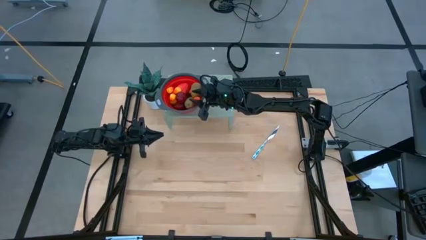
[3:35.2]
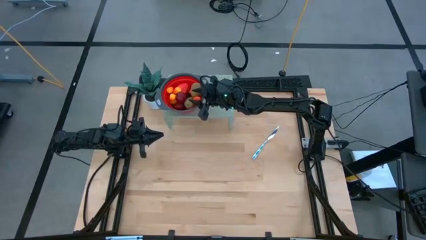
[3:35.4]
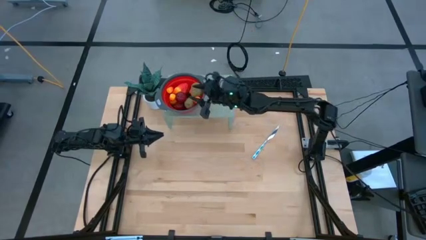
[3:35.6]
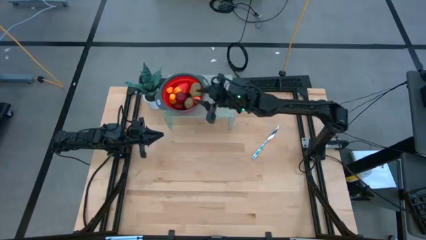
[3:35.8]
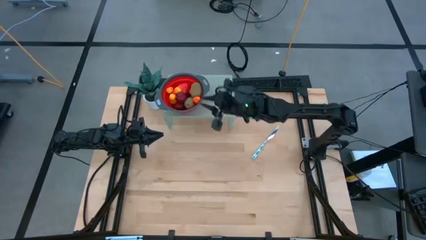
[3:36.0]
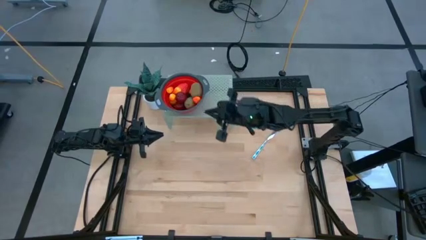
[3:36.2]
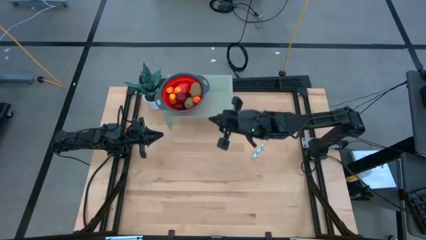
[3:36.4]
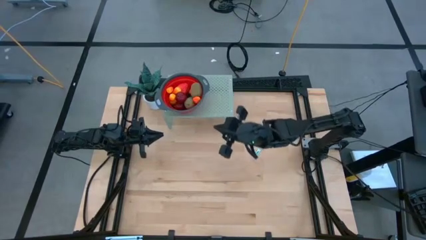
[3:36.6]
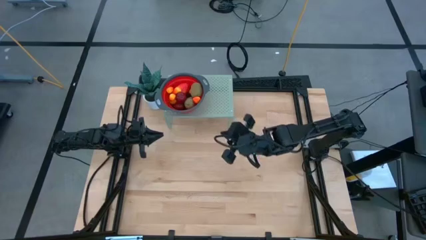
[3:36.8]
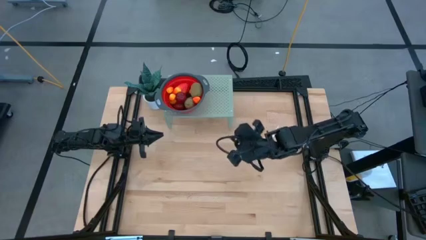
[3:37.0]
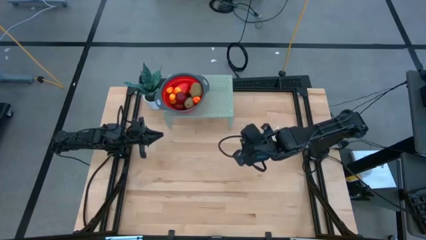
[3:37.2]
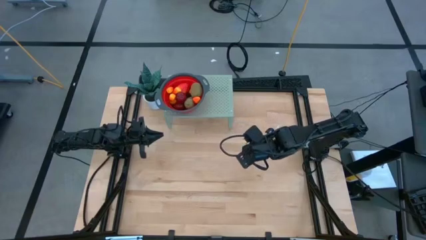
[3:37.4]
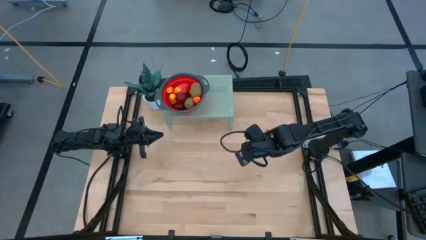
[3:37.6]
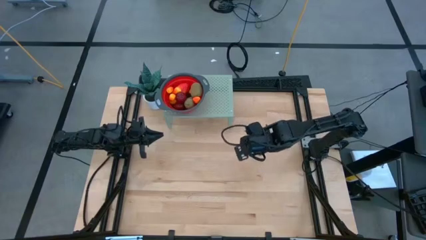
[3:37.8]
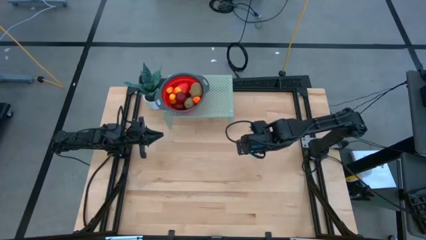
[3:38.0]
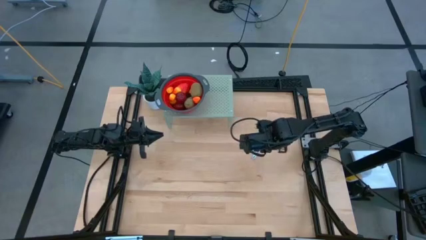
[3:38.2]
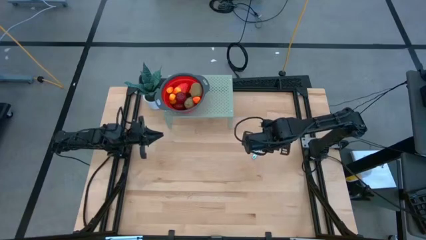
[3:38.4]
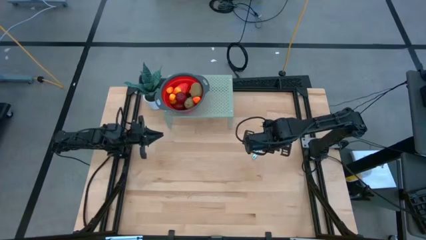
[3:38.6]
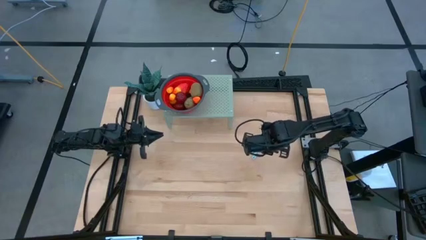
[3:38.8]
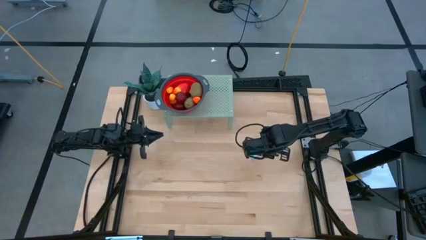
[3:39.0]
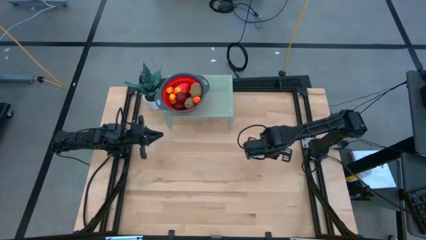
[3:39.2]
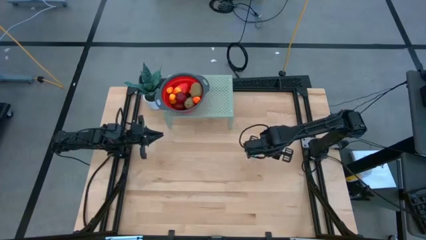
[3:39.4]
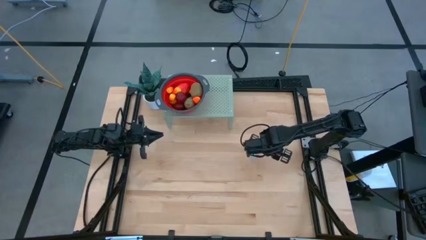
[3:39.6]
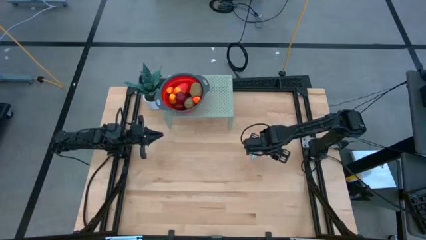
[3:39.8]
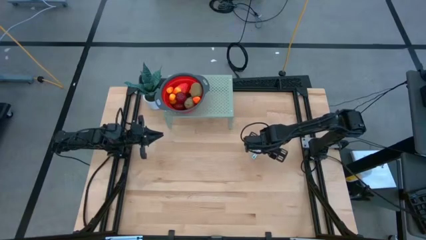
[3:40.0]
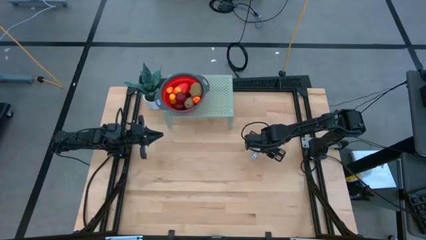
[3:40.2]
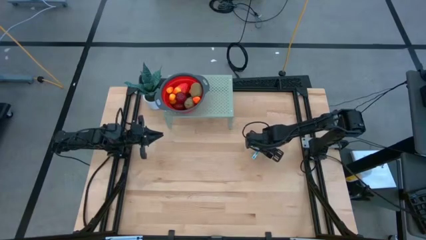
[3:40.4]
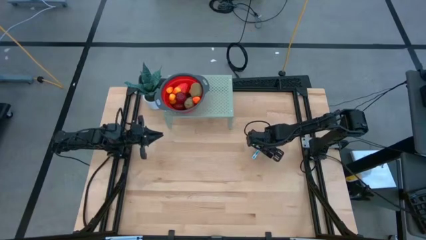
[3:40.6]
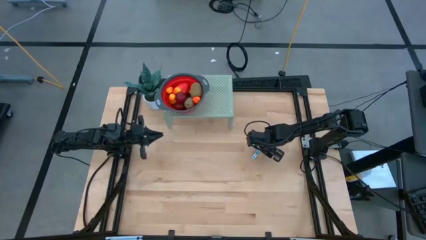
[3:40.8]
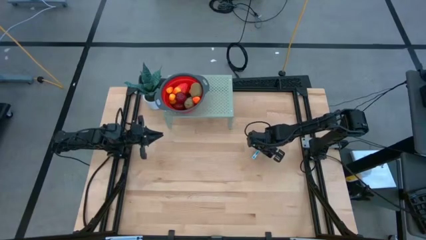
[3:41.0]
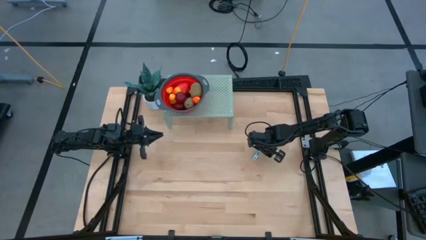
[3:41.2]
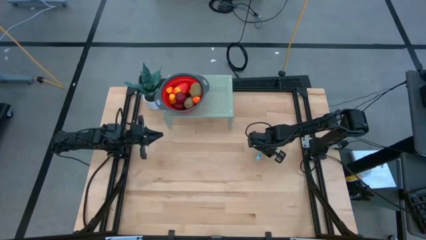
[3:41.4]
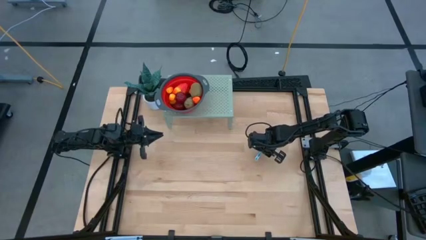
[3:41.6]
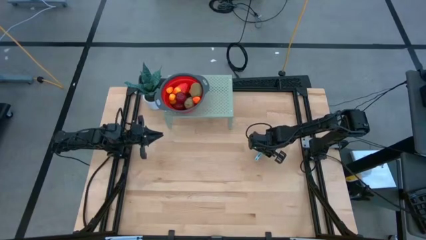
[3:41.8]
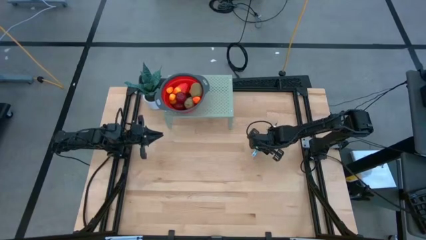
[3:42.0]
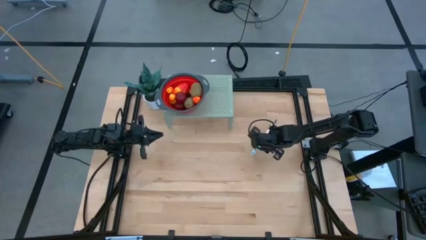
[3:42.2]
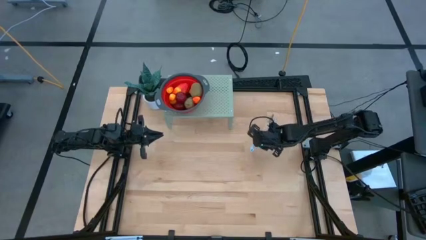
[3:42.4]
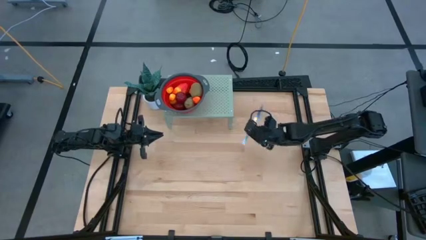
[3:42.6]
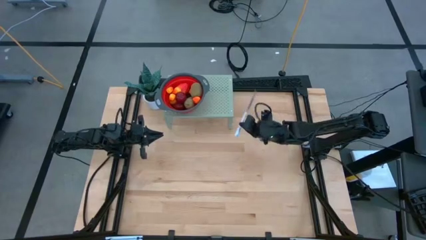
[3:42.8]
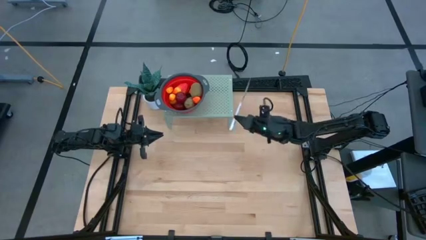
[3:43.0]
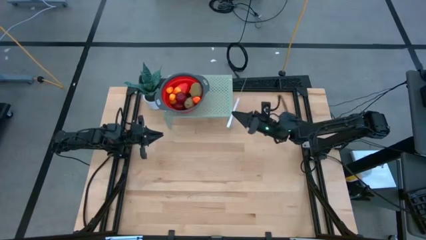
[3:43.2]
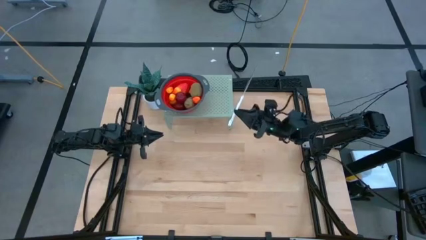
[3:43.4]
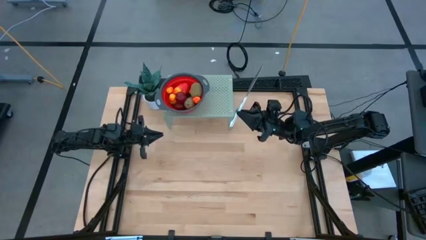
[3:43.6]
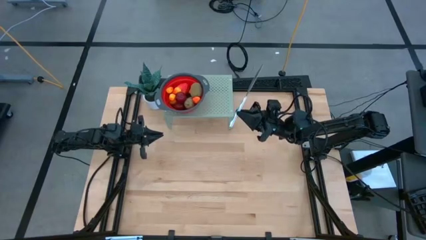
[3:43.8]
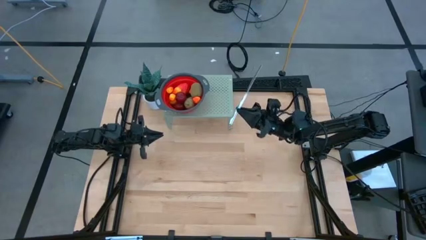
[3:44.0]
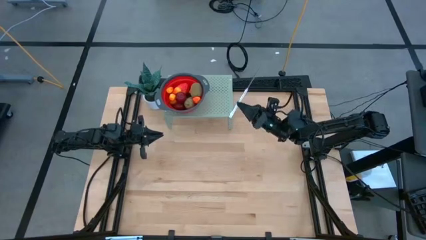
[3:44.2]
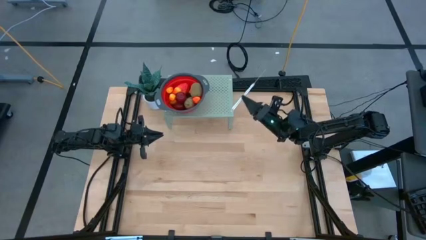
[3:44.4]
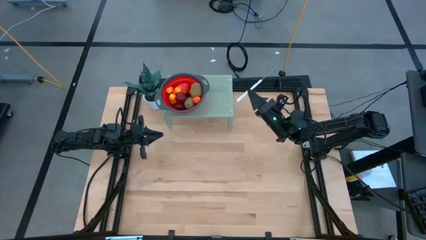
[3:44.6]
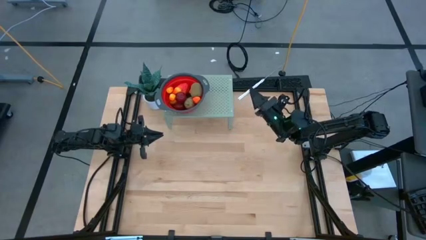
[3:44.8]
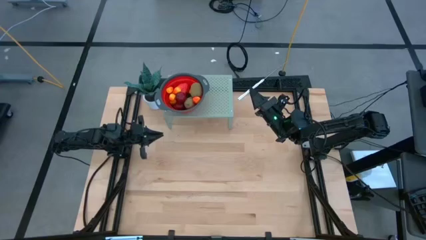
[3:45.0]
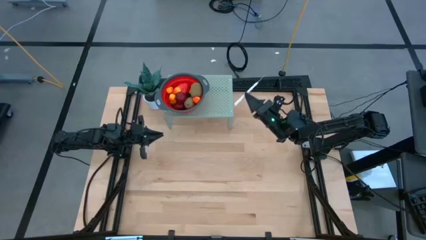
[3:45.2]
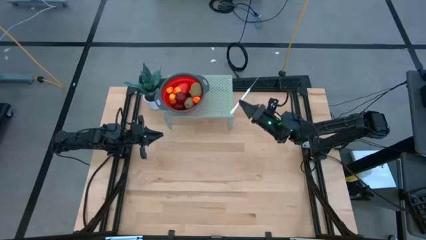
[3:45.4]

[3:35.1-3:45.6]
Task: Pick & Place Fruit
Put the blue knife on the shelf

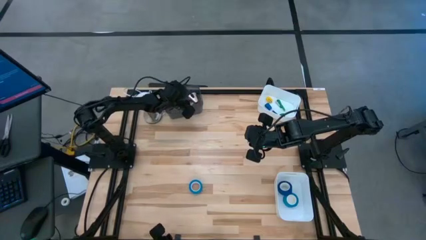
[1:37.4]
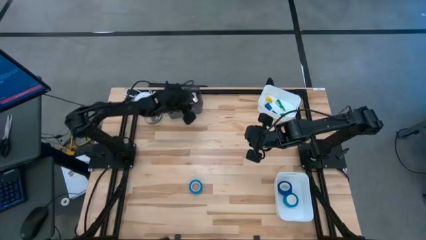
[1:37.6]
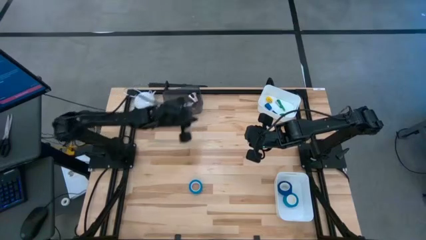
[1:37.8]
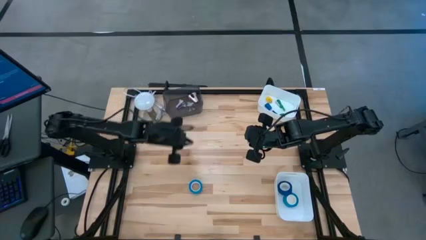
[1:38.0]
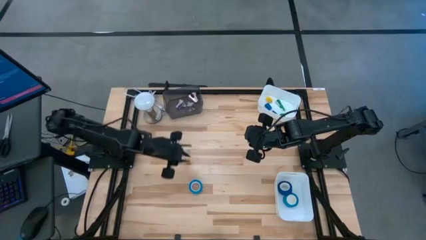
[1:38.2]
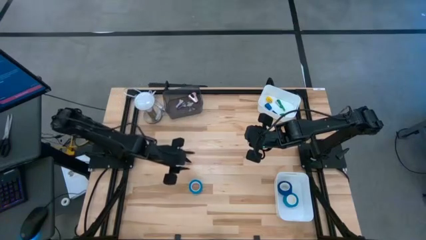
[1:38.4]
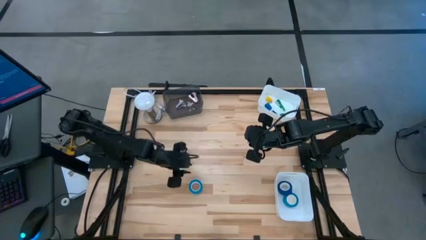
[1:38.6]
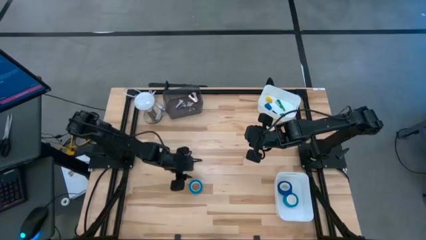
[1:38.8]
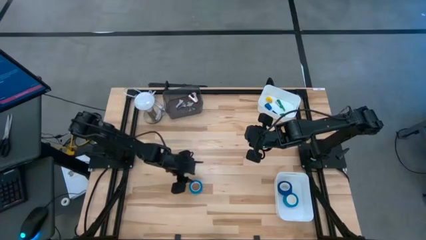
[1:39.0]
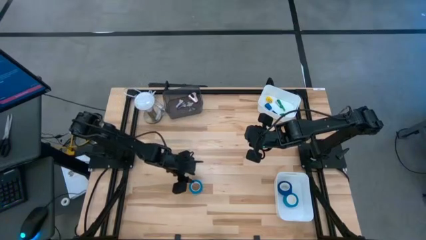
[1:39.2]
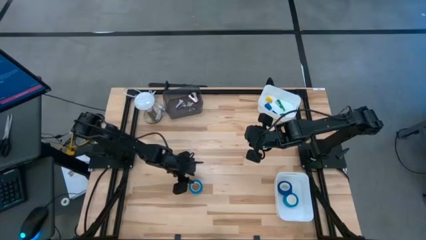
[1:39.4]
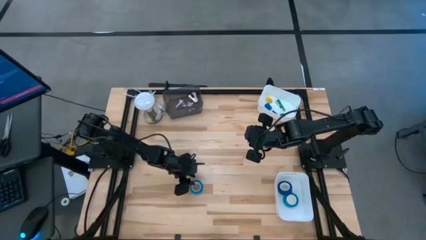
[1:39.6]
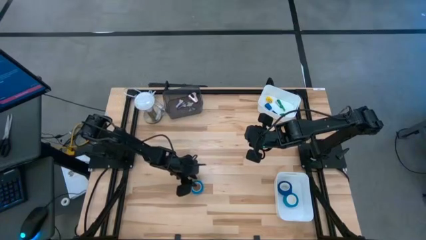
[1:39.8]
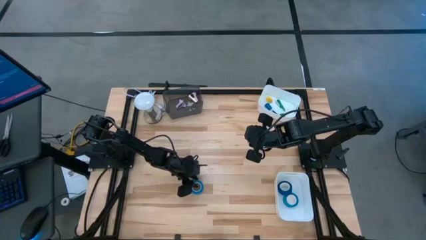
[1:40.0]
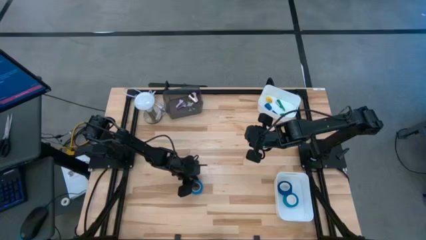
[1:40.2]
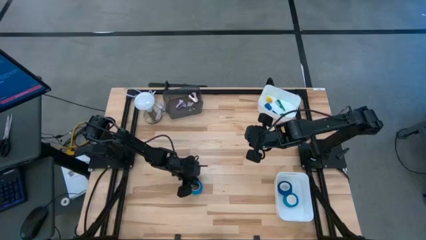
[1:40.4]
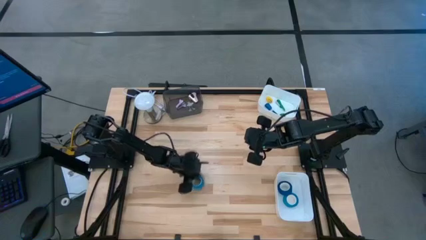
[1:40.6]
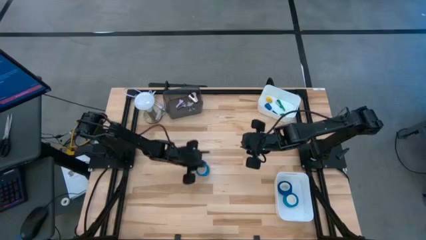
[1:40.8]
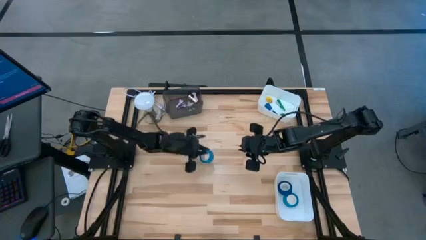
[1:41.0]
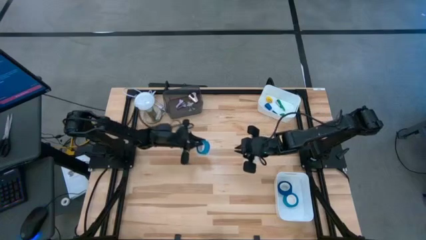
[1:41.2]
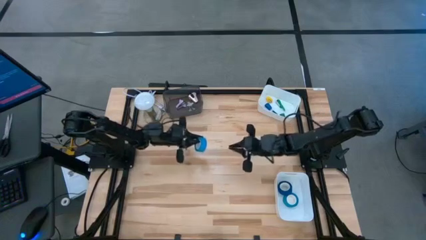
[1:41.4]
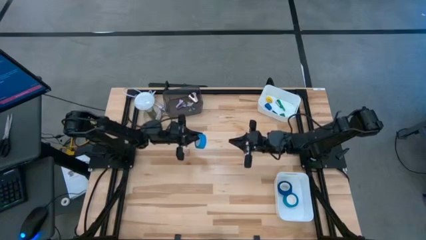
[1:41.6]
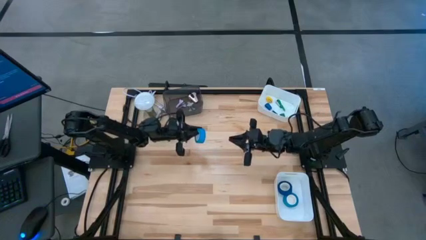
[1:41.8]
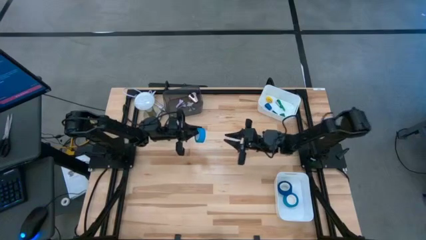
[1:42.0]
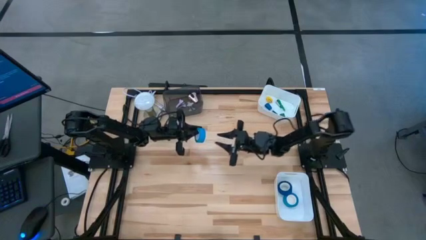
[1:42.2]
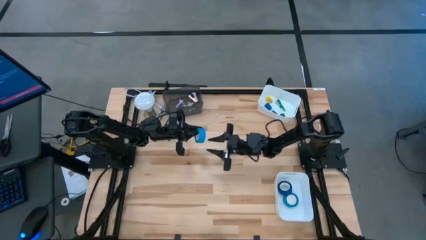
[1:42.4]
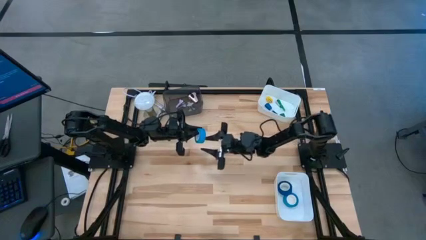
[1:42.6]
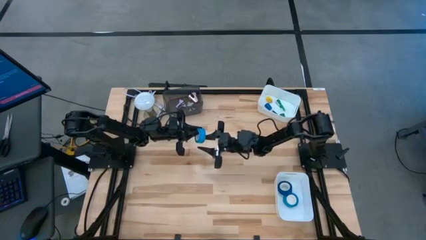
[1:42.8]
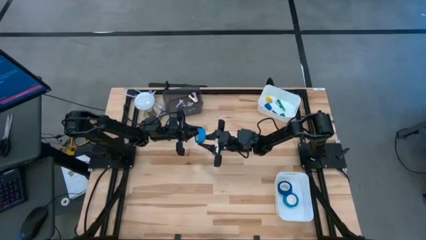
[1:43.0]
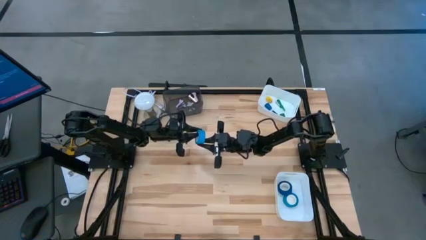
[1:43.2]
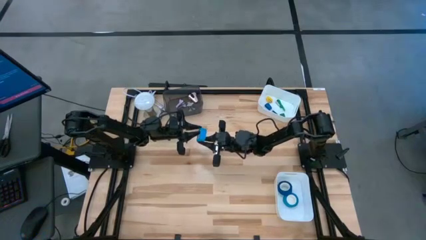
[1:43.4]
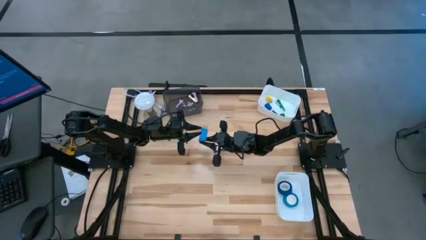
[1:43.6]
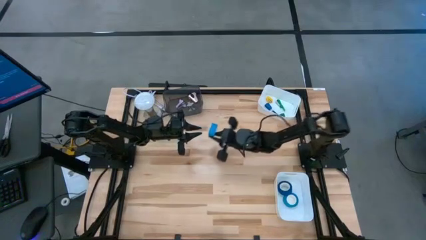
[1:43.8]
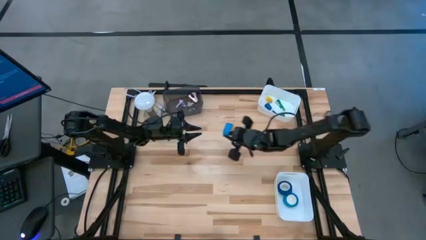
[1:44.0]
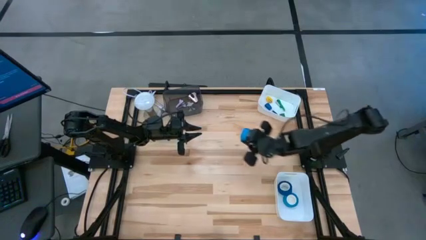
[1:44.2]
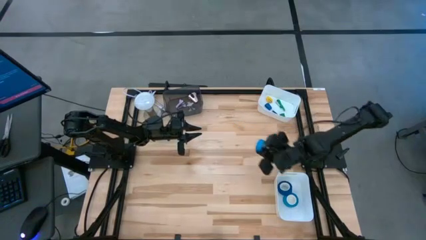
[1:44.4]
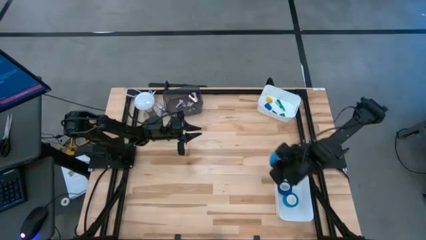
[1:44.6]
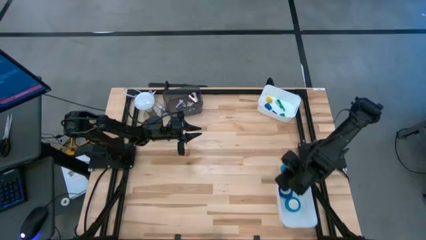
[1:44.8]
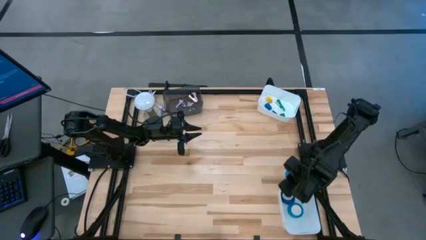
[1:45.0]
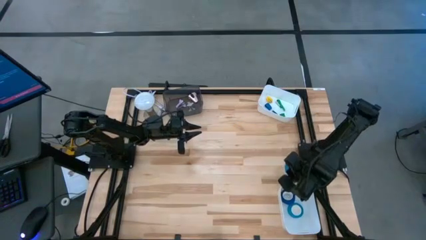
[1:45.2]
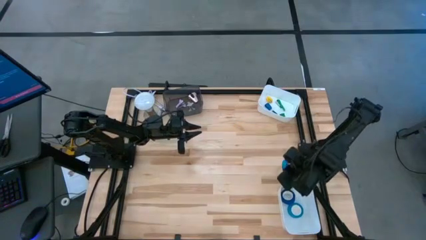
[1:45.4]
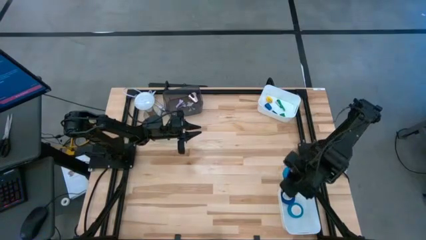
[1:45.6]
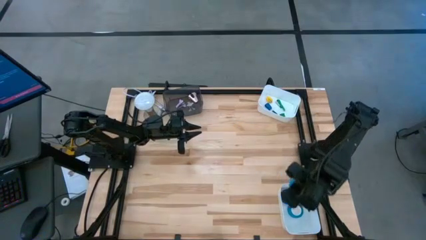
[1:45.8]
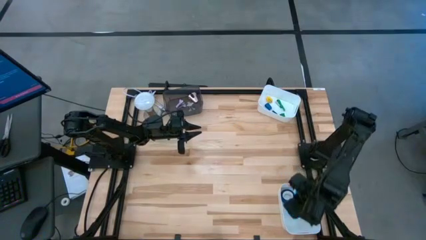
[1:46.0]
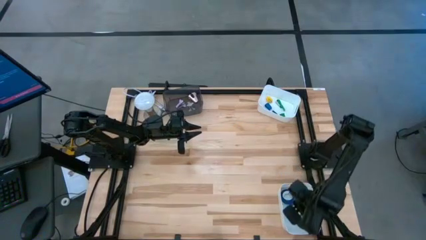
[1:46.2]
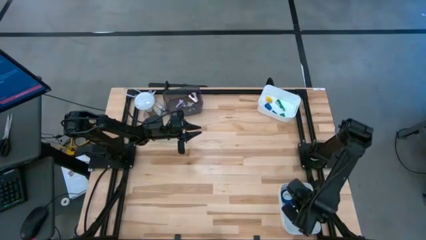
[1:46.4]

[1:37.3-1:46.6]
Task: Pick and place Stapler, Stapler remover, tape
Put the light blue tape into the bottom white bin
